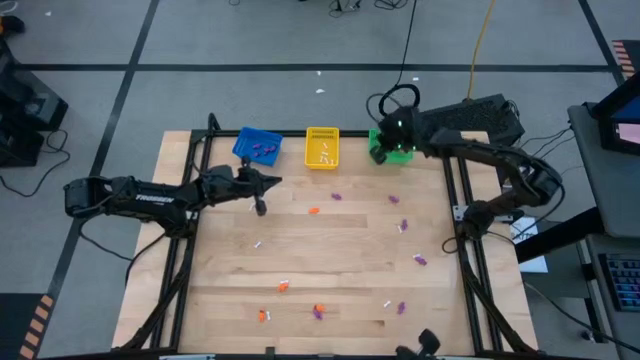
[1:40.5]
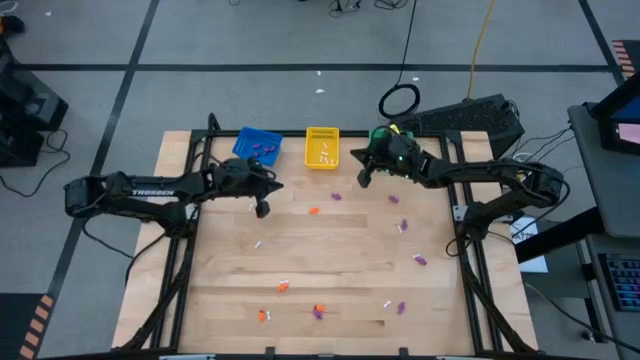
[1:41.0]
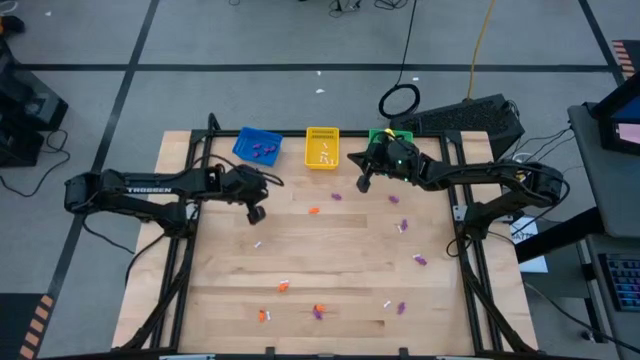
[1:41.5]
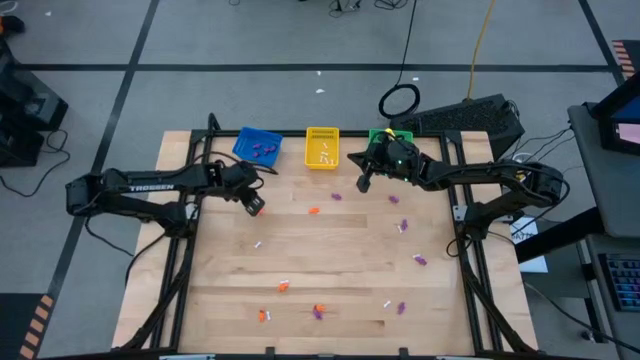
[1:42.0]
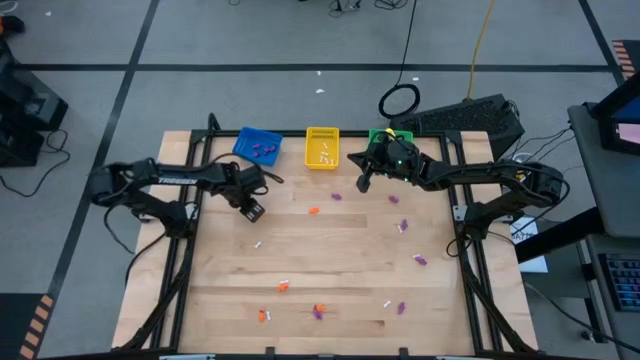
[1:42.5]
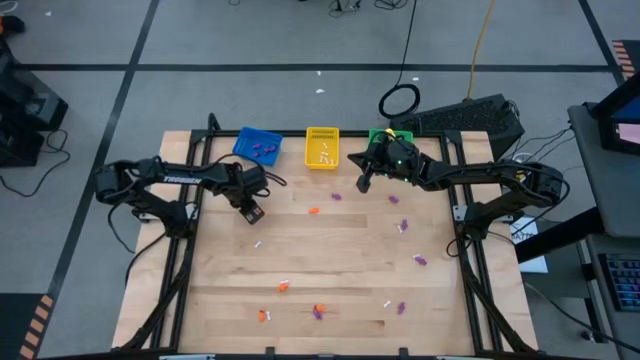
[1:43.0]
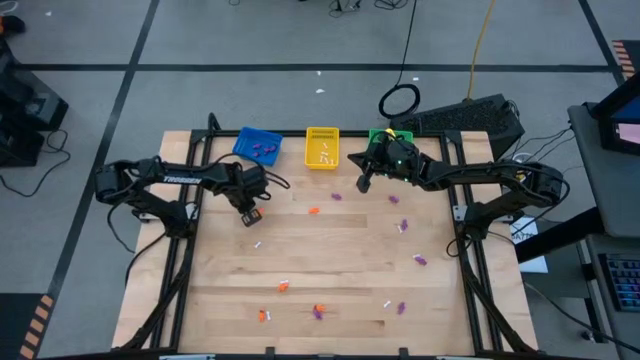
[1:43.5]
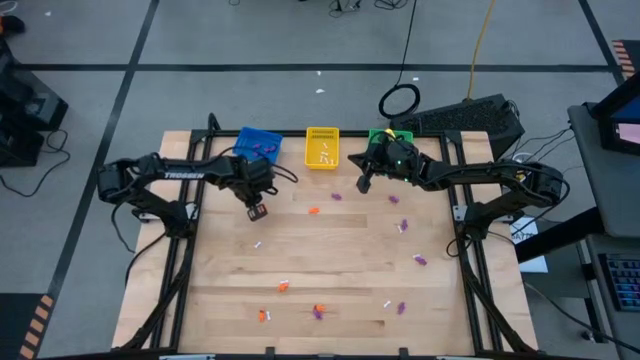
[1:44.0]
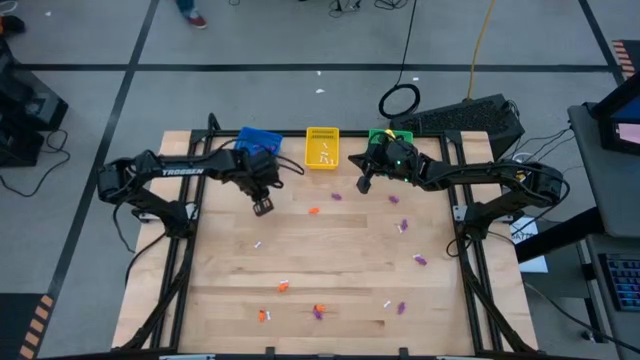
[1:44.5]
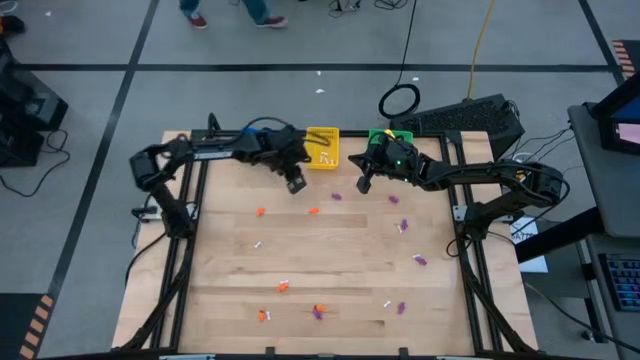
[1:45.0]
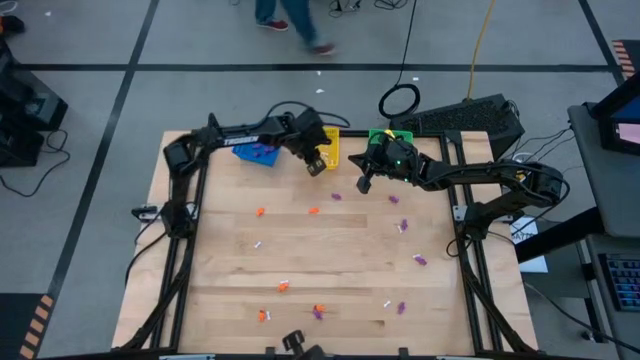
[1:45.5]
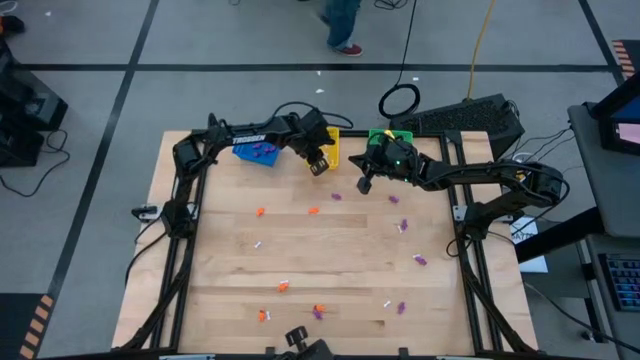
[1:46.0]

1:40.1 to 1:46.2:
Task: Sort Halloween decoration
Put the white bone toy into the yellow bin

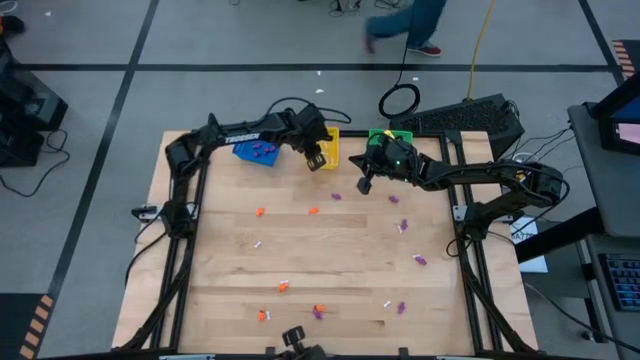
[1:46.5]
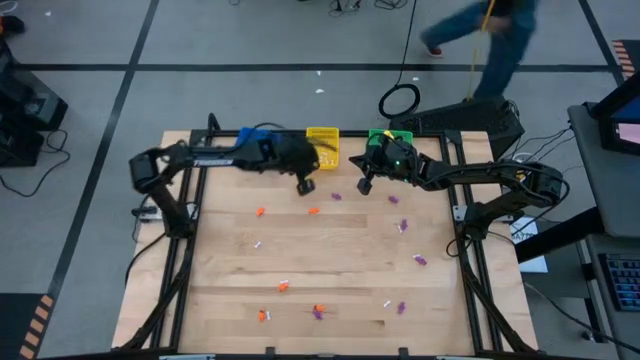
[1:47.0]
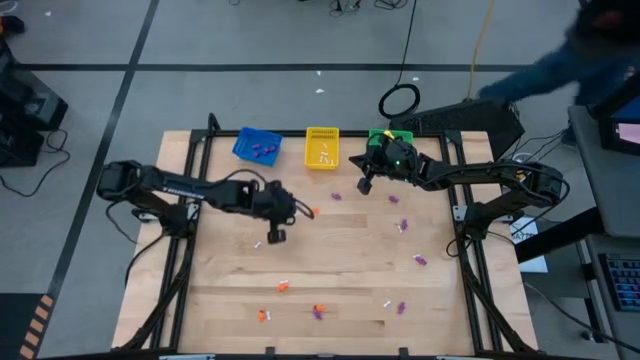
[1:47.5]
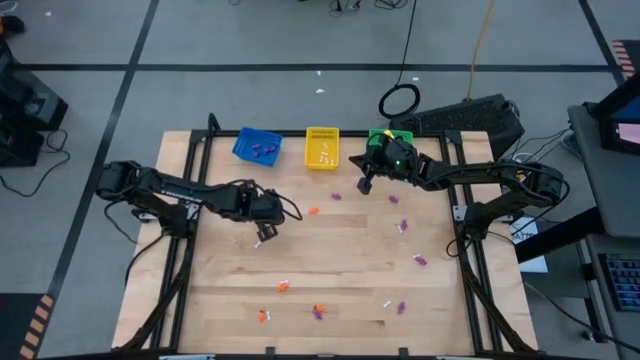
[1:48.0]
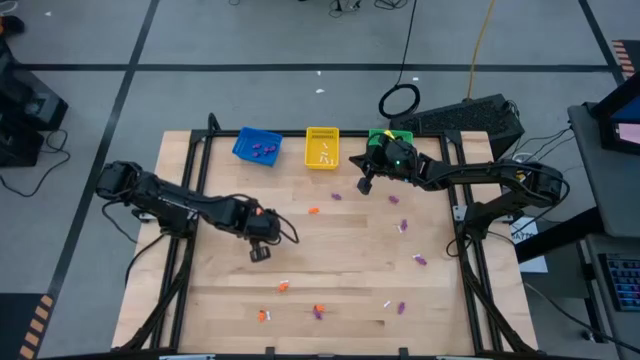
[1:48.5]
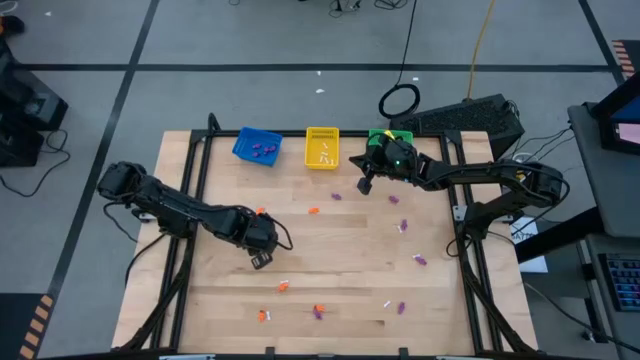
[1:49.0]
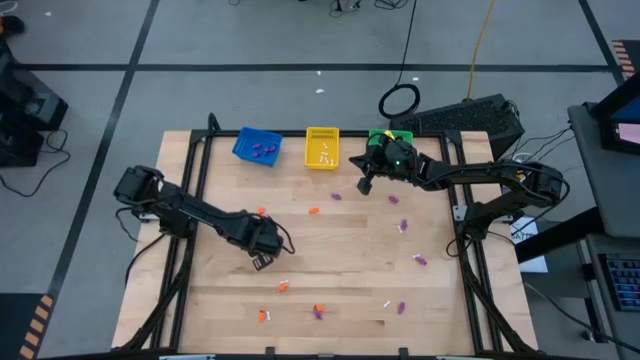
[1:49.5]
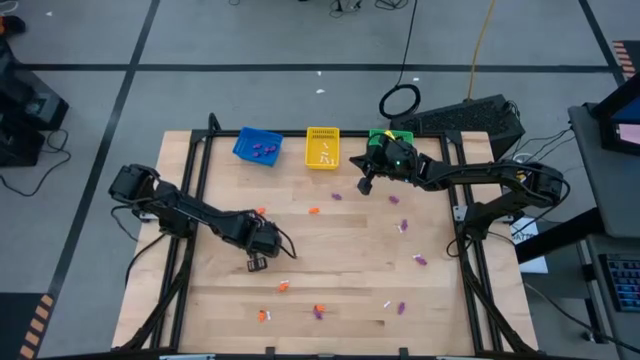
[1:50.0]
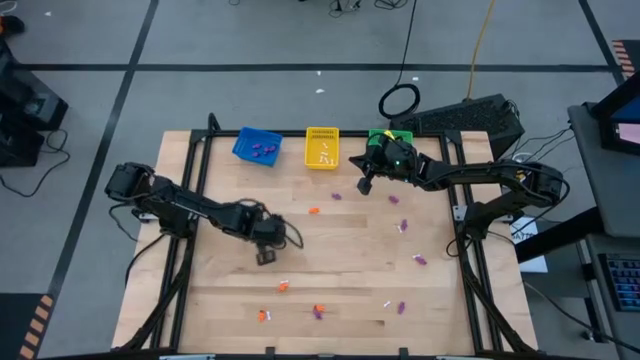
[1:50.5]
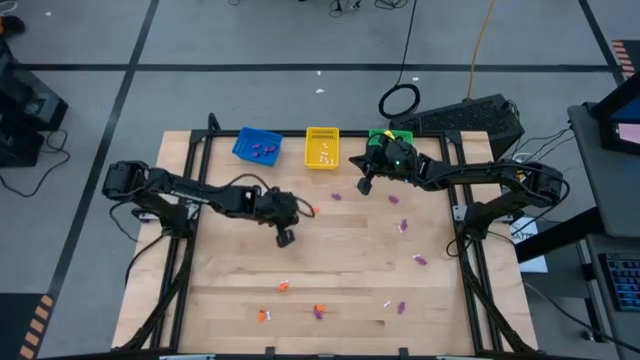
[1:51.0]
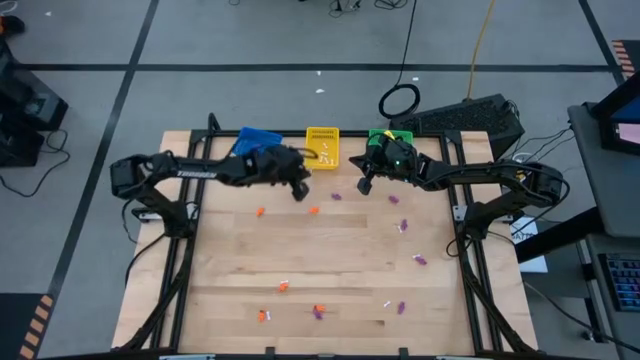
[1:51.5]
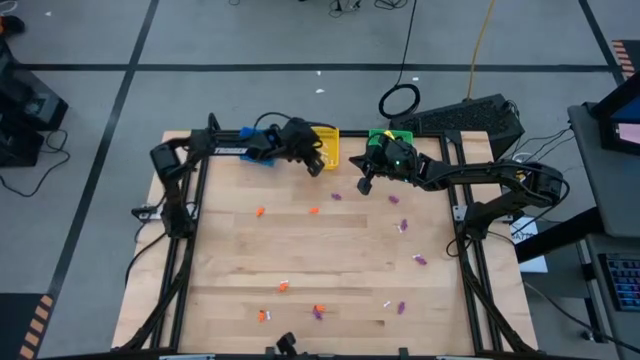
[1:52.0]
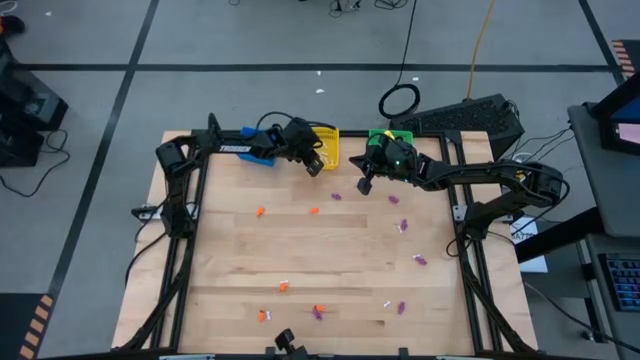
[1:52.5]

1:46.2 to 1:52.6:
Put the white bone toy into the yellow bin

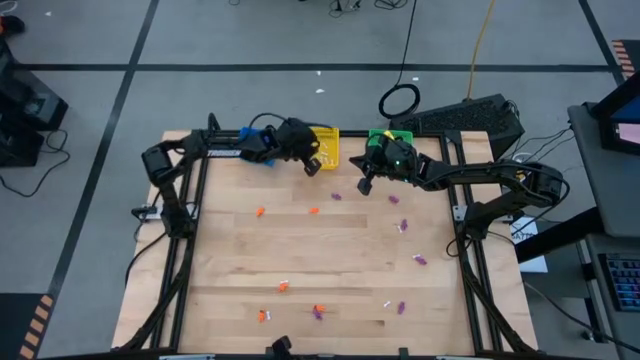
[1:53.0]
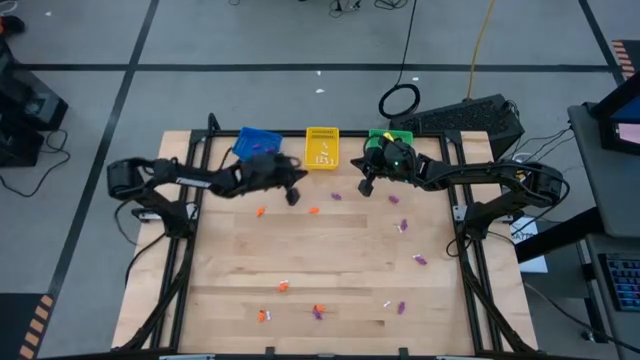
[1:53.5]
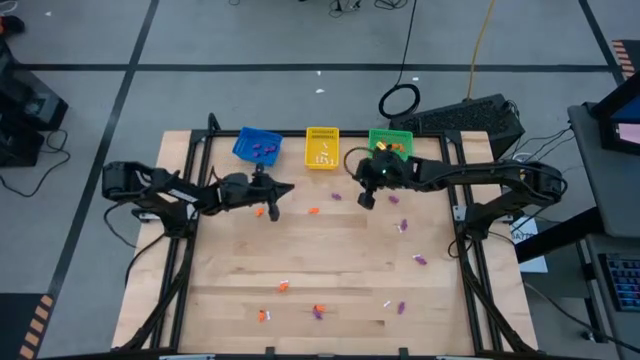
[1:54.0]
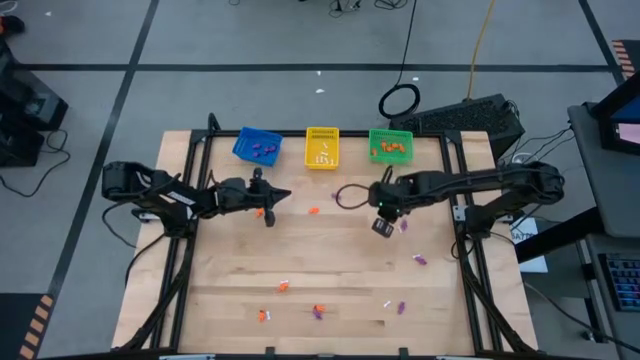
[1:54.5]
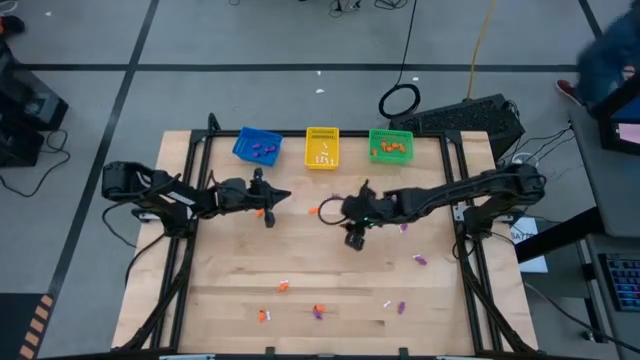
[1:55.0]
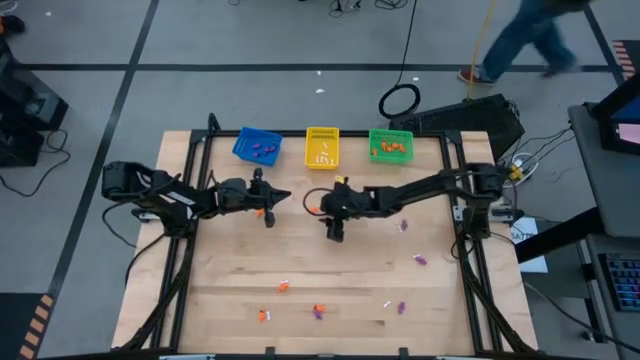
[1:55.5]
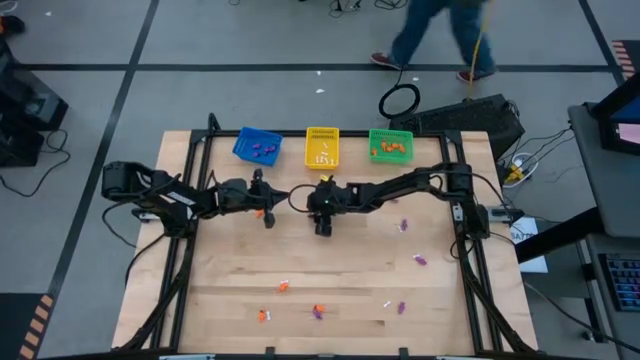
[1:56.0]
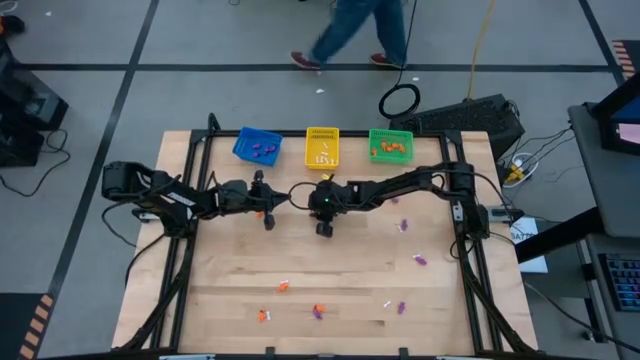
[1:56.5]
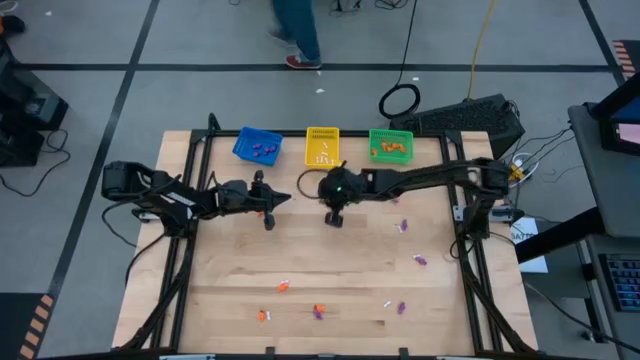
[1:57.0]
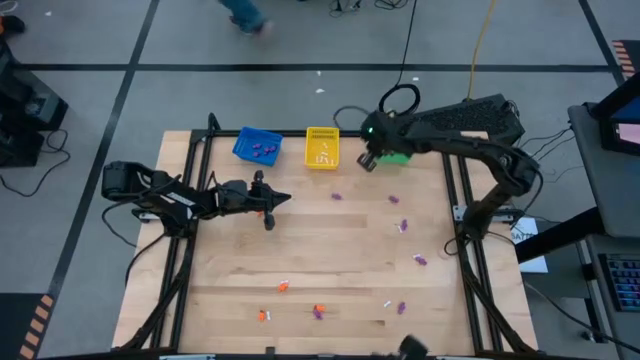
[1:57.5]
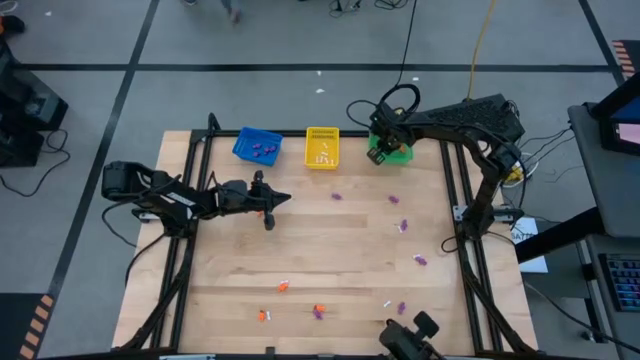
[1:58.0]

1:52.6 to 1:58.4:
Put the orange skeleton toy into the green bin

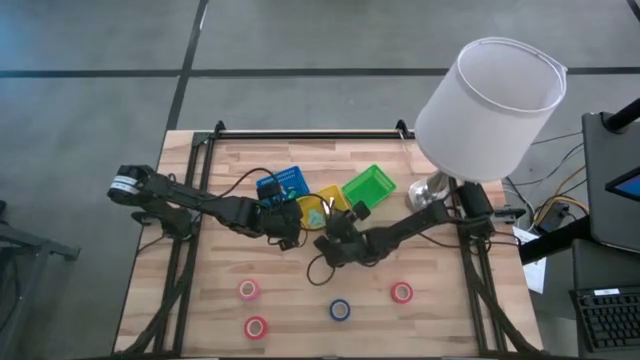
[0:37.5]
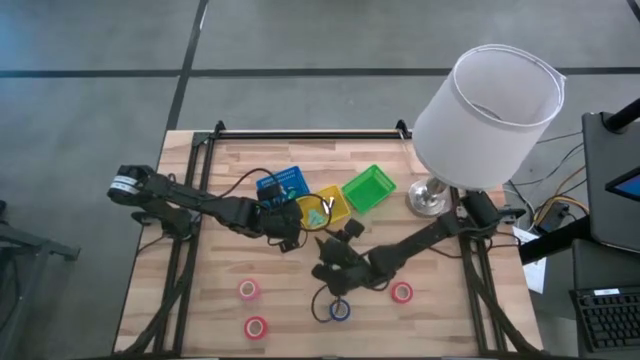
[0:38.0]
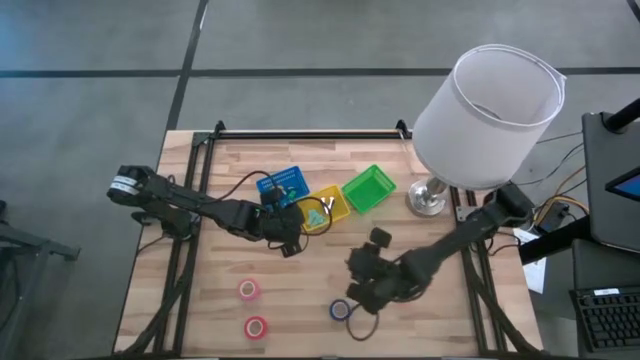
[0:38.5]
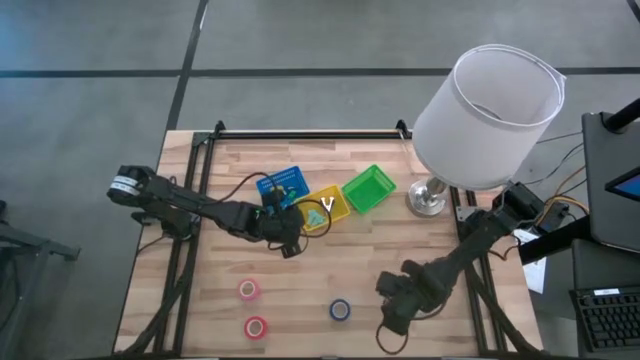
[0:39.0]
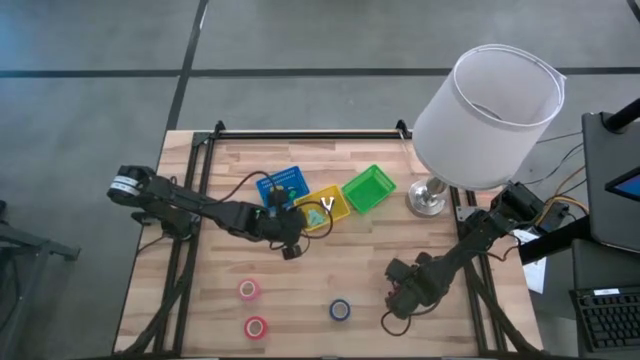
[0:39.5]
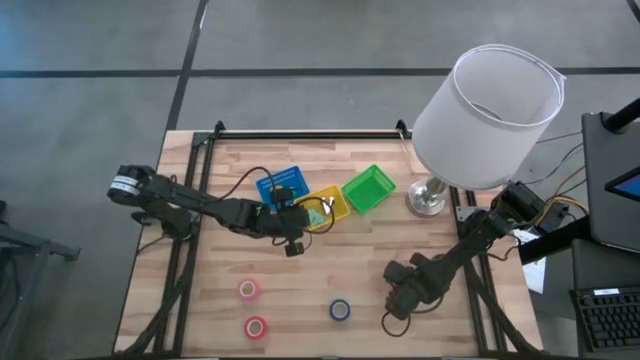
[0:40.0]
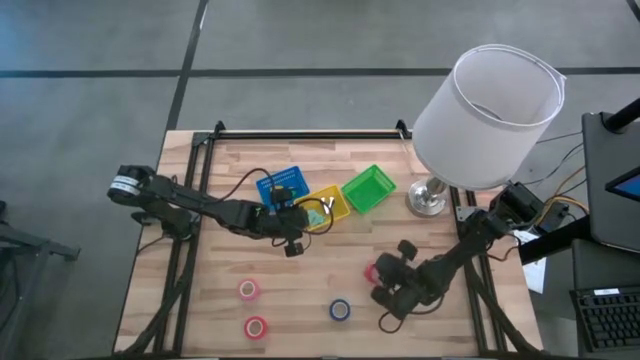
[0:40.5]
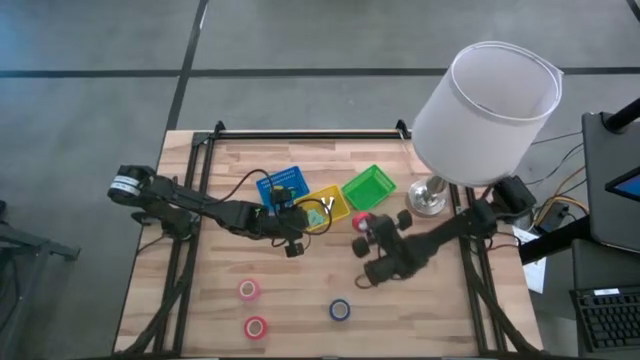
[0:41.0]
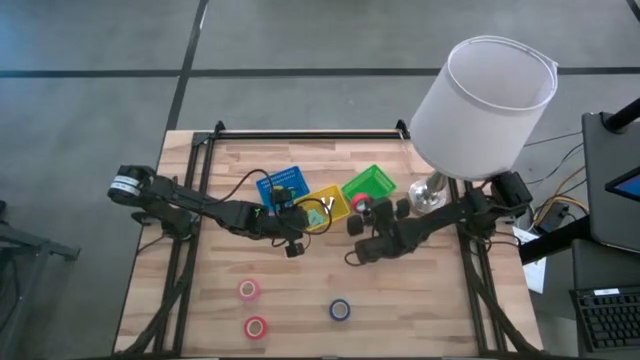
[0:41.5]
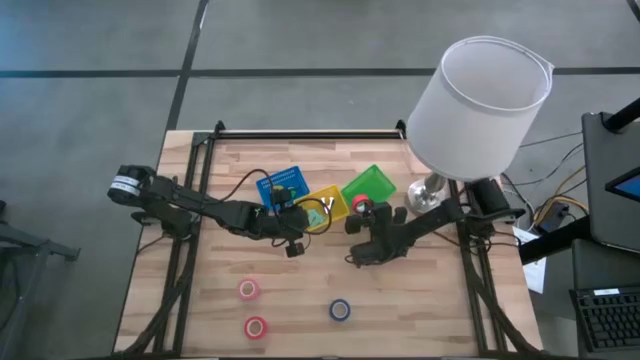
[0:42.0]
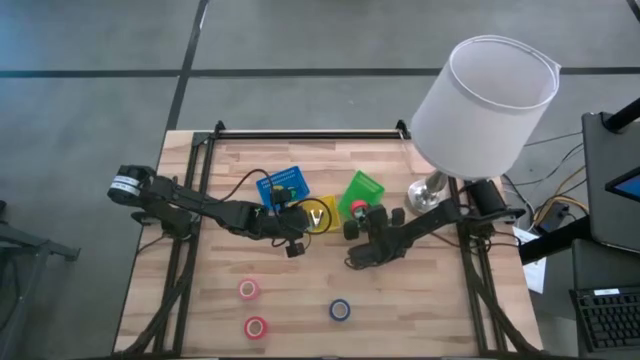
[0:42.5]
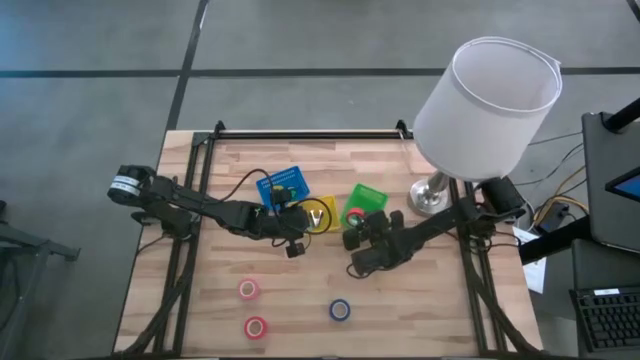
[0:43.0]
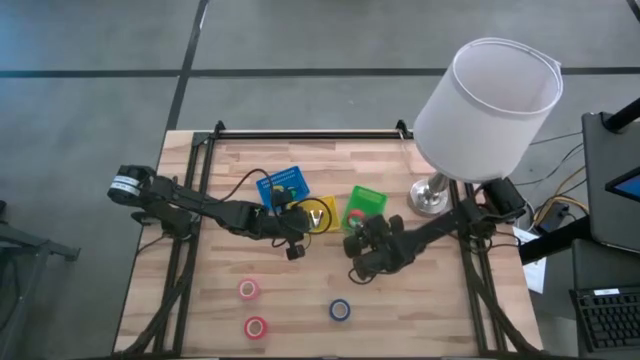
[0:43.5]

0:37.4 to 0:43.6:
Task: Pick and place Stapler, Stapler remover, tape
Put the right red tape into the green bin
